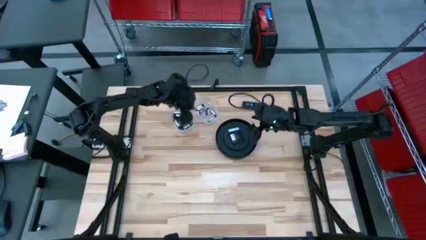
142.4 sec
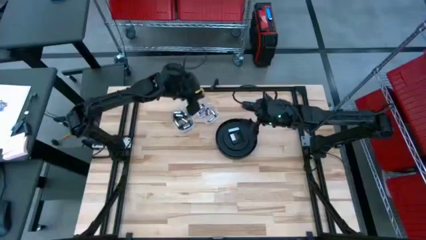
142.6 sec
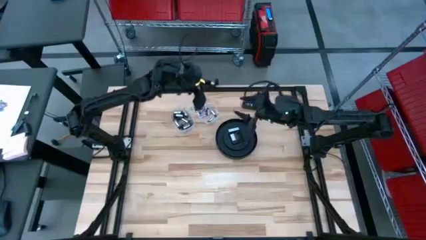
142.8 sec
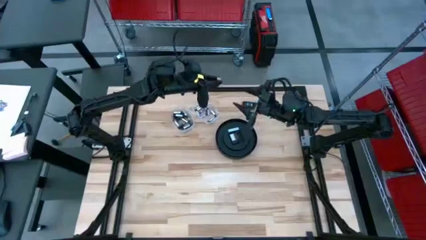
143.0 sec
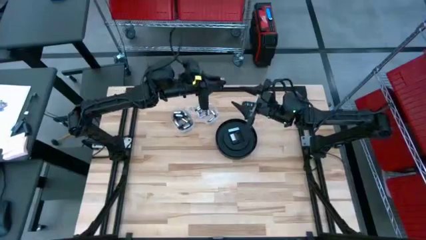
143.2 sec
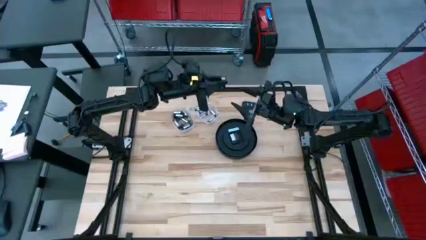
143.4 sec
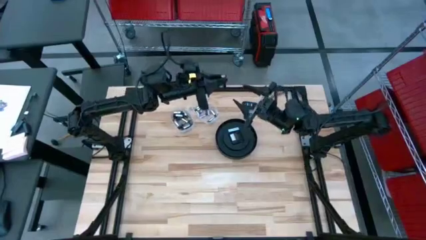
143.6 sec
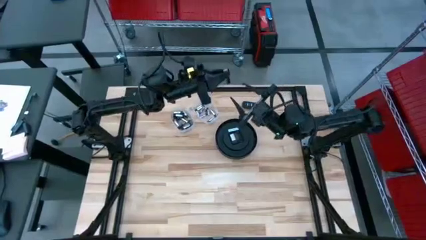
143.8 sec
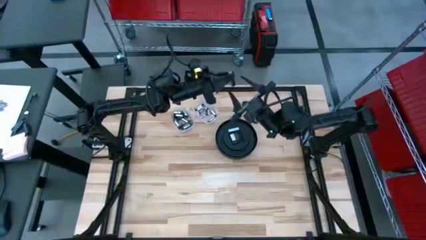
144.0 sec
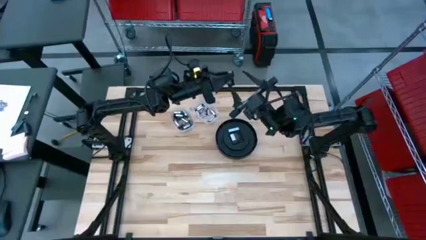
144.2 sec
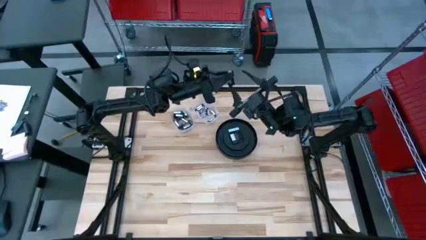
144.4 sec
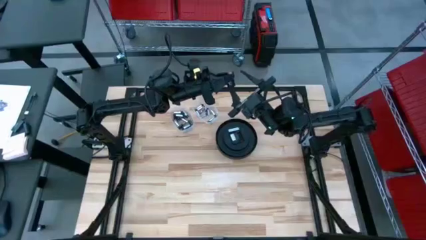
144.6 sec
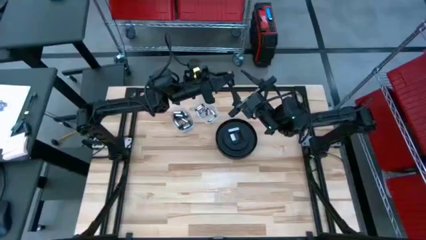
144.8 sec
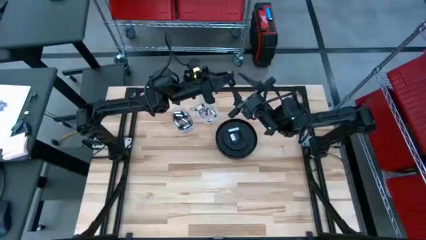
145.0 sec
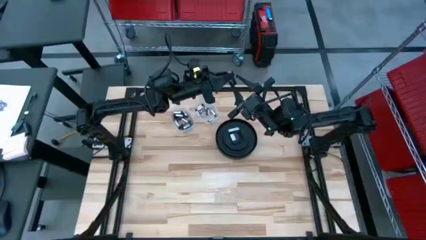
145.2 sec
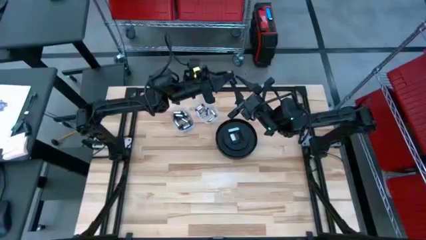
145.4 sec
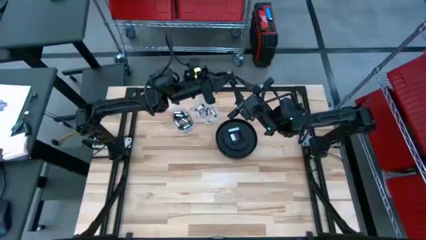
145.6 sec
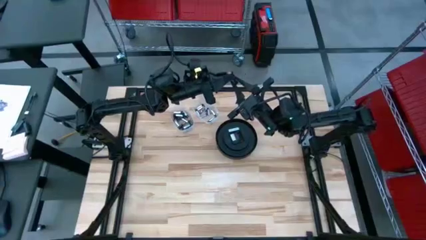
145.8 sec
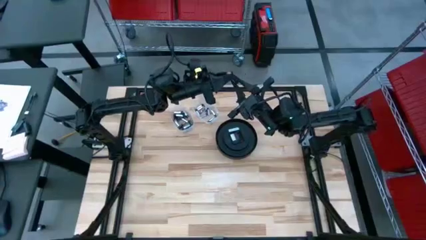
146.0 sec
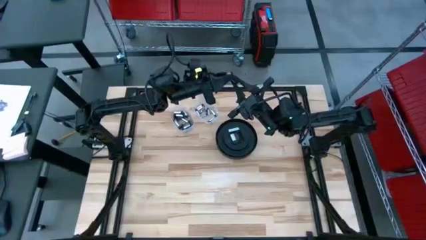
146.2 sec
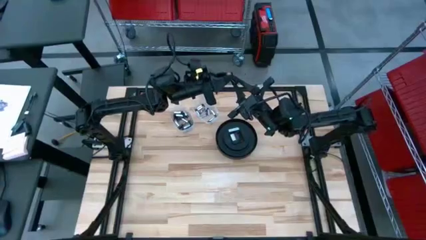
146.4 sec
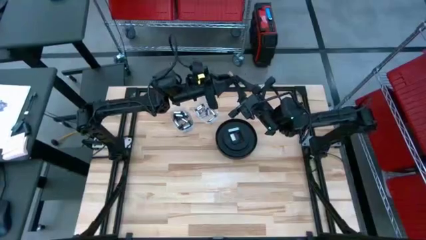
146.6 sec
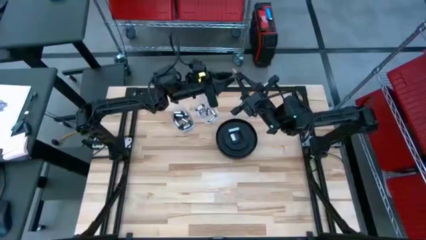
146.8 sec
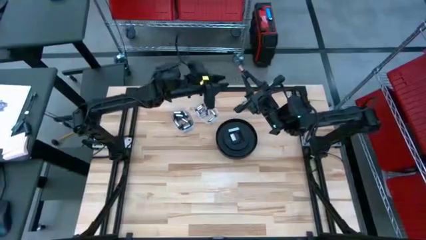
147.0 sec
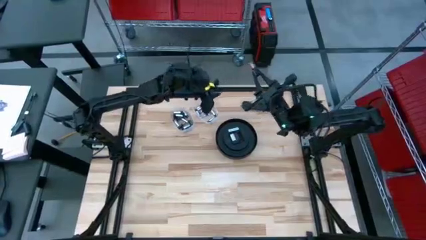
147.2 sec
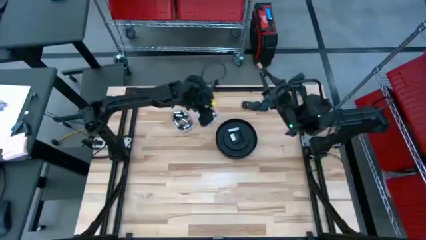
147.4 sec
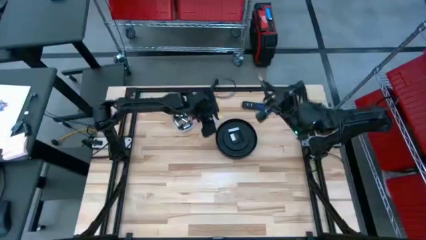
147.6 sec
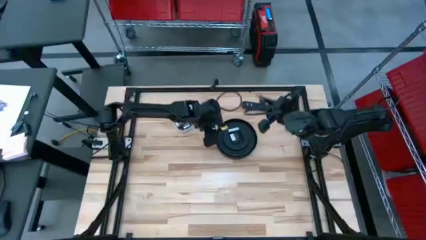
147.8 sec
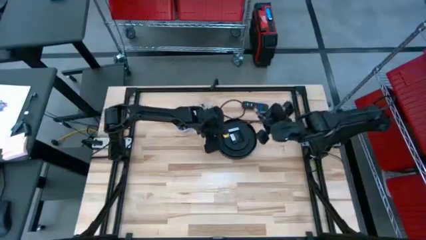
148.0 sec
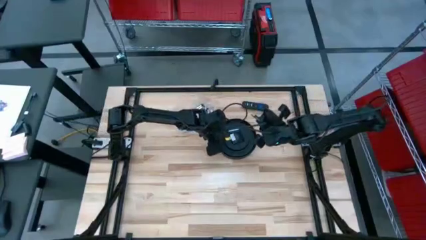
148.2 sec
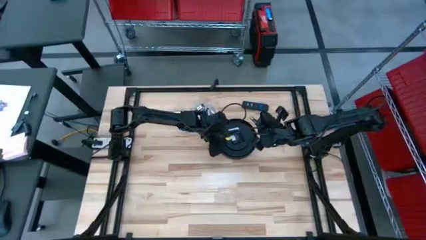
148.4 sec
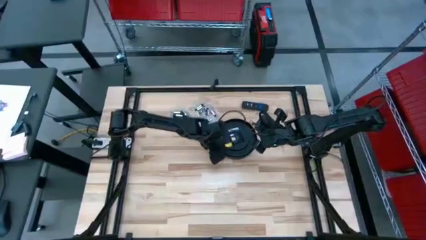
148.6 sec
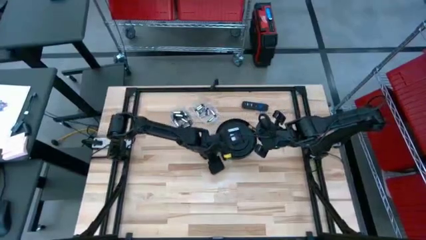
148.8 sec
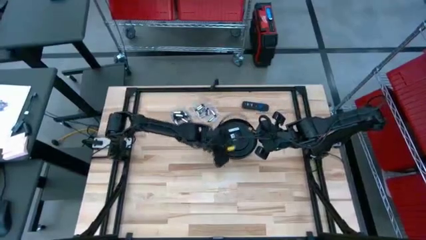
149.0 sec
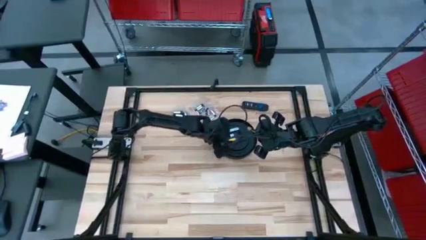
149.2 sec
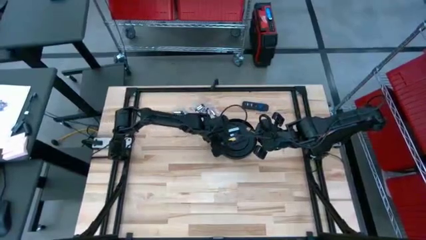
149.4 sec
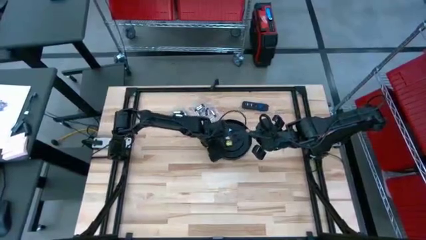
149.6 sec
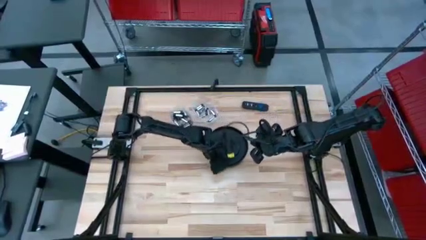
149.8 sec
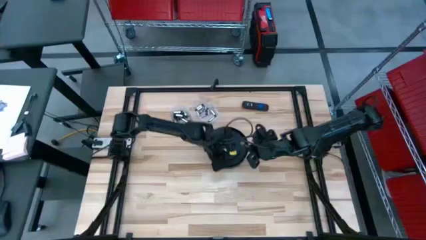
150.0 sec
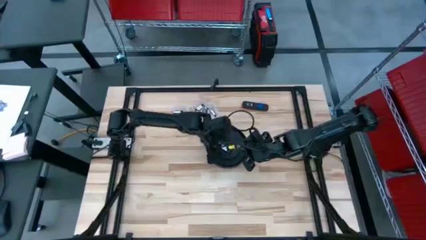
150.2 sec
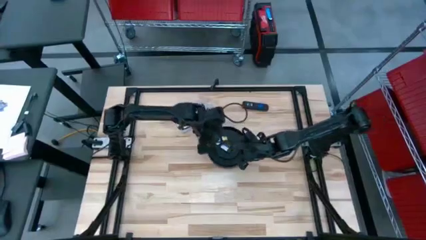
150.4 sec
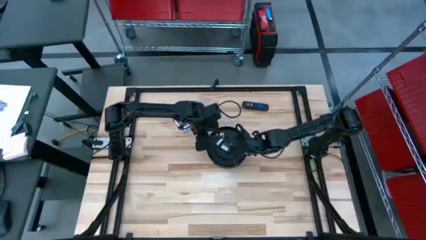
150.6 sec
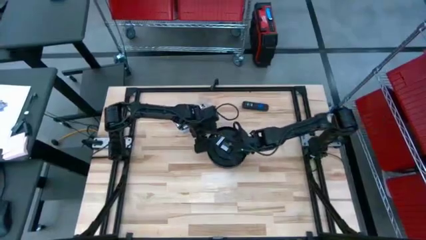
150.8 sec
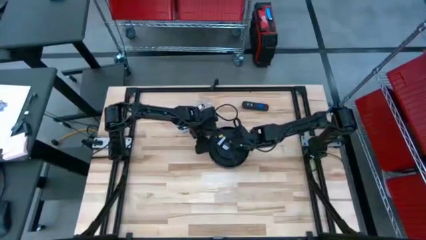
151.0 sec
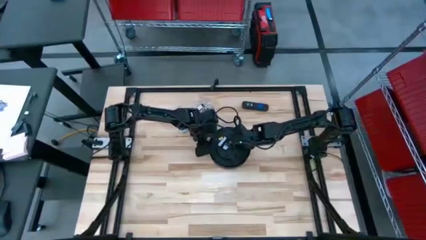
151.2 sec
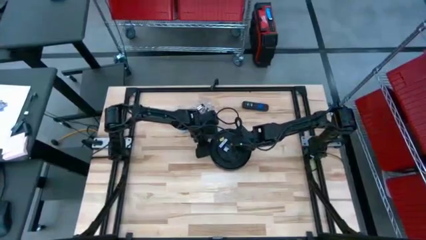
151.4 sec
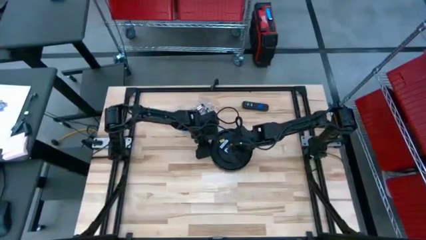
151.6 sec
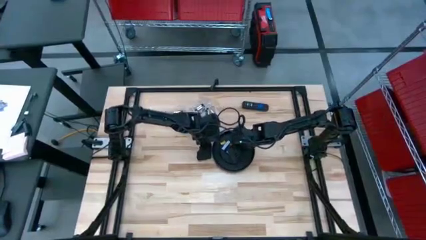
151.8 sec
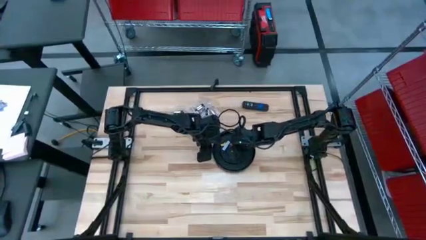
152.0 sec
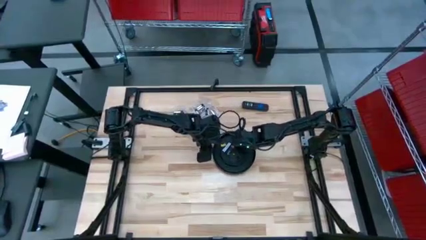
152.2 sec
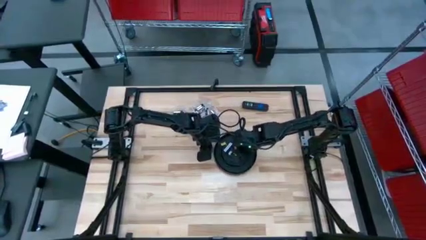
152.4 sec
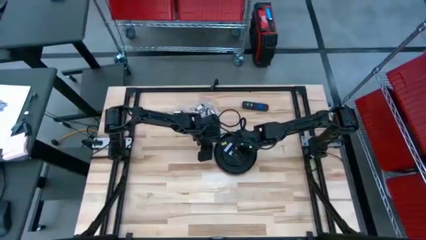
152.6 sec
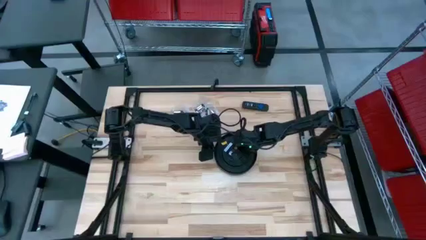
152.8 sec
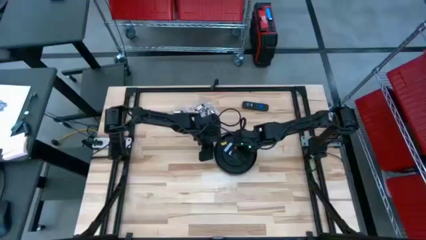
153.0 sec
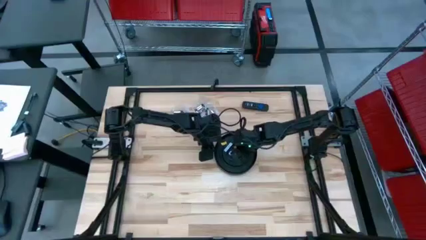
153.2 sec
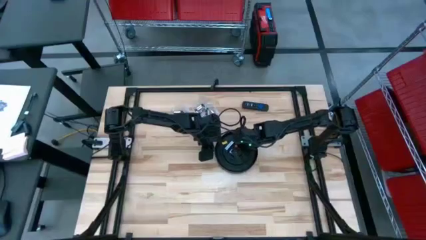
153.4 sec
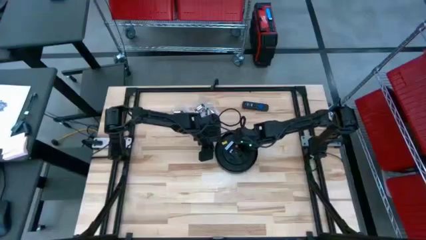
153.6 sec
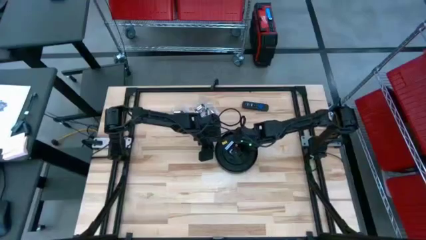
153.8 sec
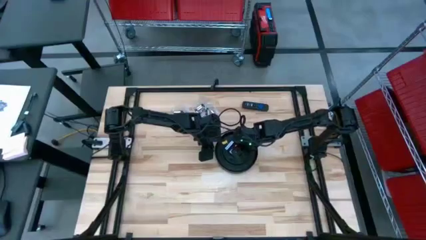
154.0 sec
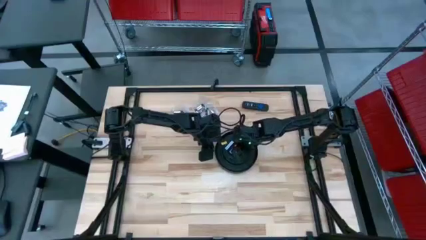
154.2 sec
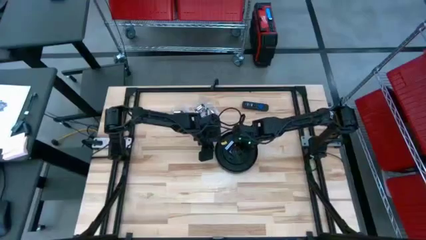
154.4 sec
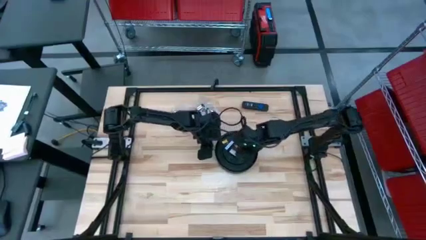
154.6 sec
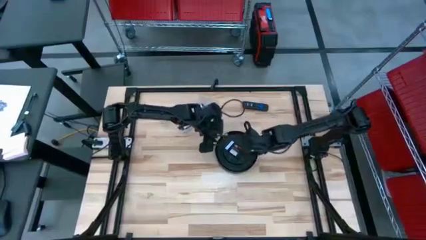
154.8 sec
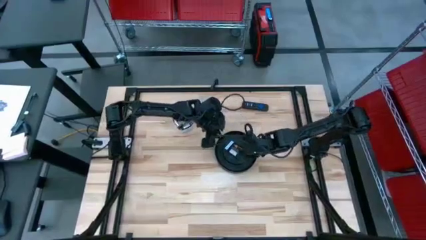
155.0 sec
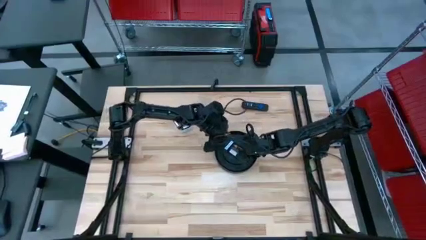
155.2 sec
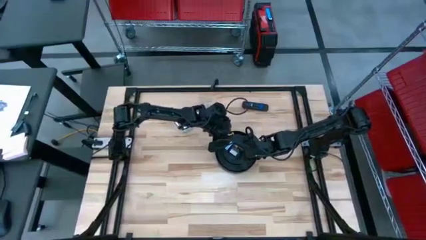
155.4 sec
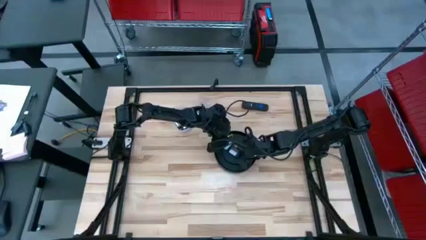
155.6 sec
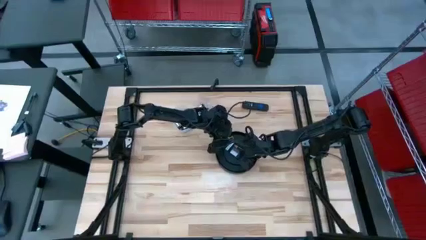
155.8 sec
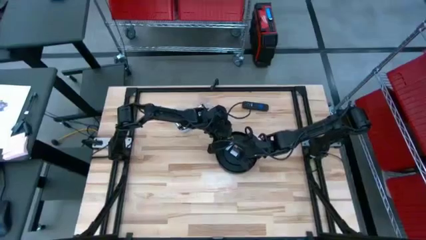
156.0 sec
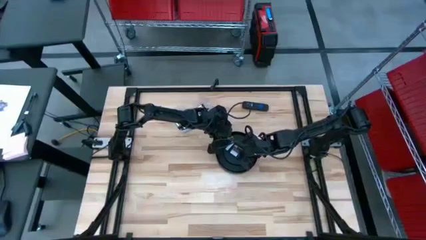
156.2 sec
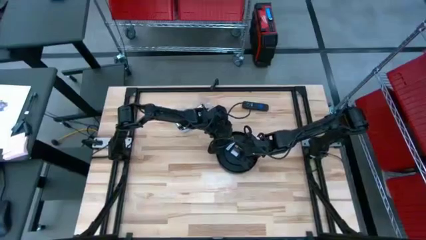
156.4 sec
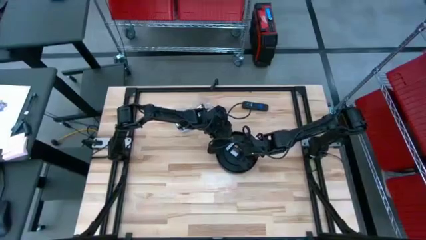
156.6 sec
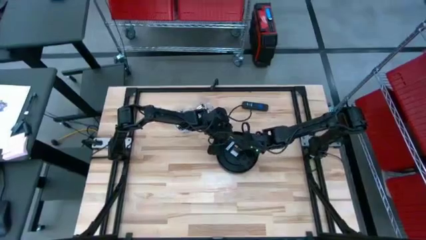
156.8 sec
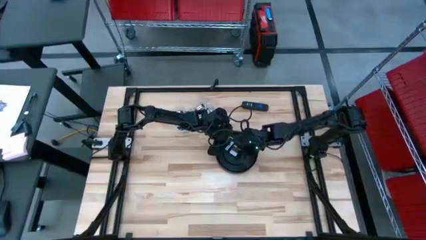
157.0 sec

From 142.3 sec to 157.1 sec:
Task: Insert battery
Insert the black battery into the wall clock

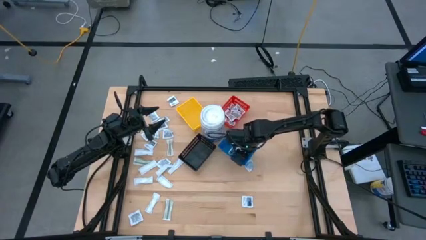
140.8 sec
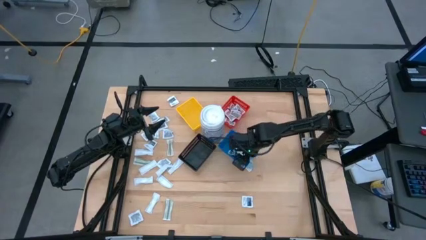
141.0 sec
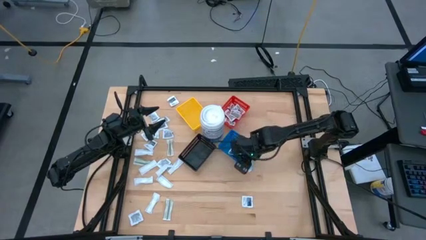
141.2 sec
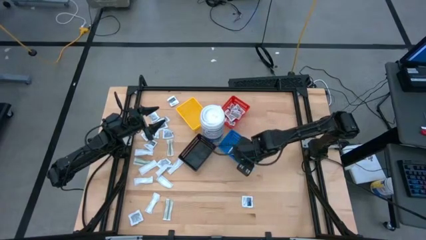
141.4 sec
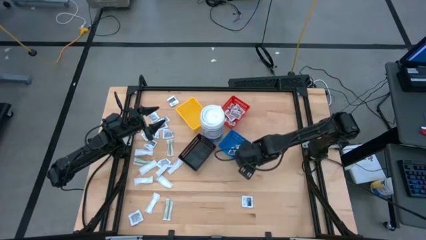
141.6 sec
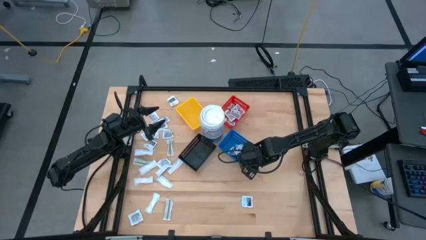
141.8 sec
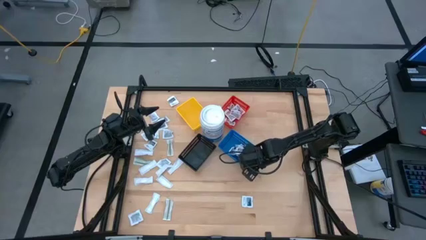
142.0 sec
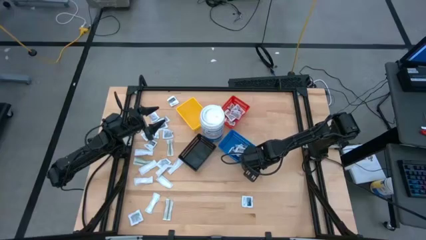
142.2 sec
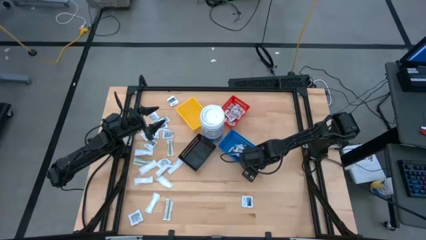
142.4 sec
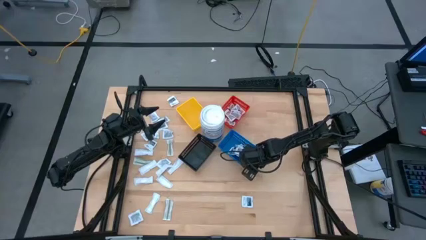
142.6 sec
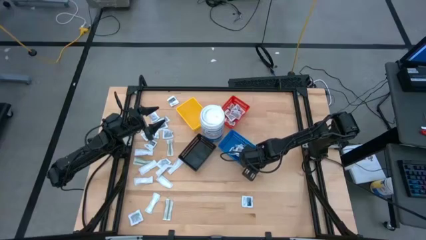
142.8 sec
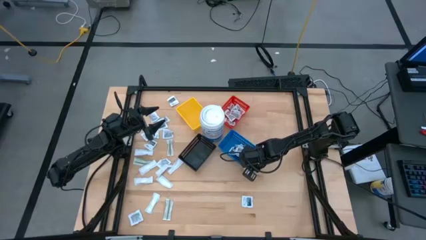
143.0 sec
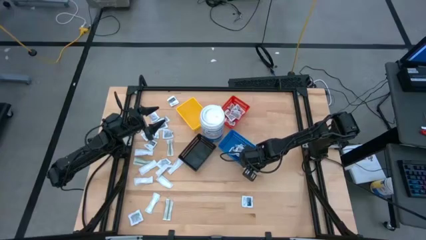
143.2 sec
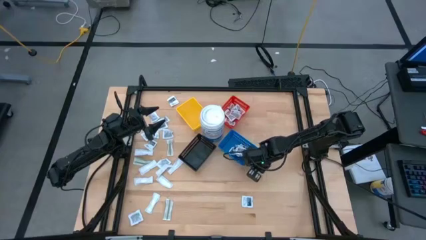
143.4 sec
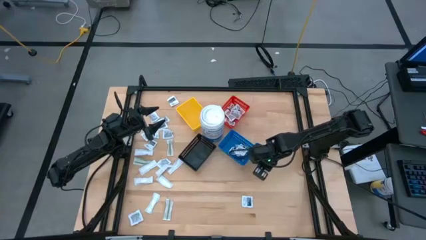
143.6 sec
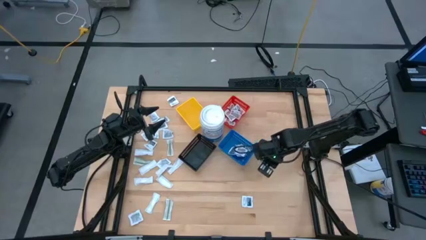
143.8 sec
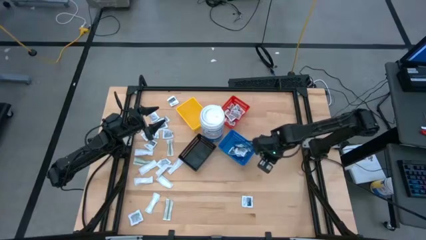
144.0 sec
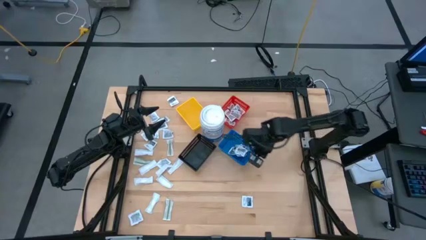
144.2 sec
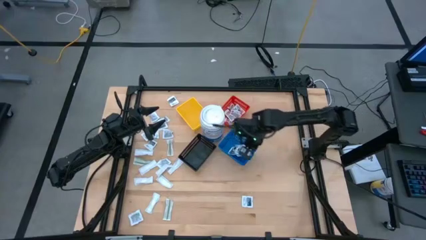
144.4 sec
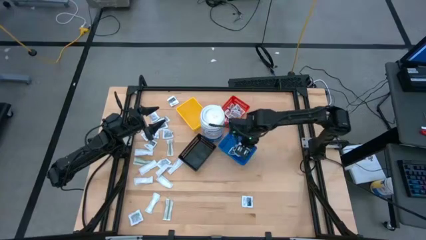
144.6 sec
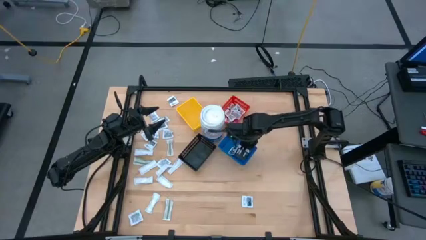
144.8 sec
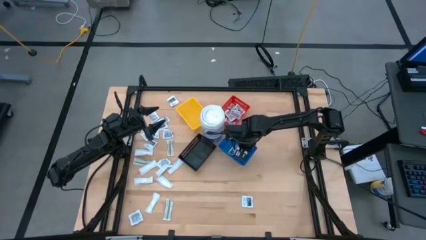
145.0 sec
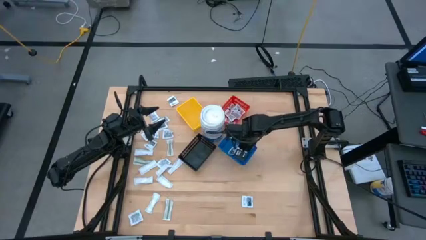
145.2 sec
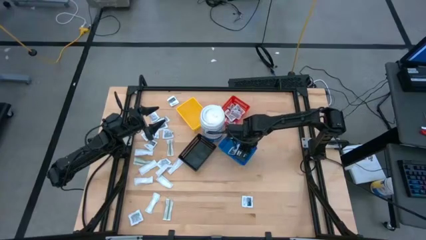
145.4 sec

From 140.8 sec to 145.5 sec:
Task: Pick & Place First Aid Supplies
Put the alcohol pad into the blue bin
